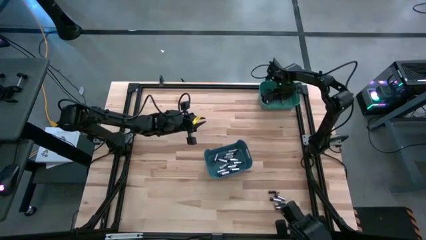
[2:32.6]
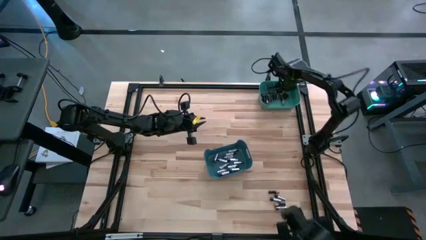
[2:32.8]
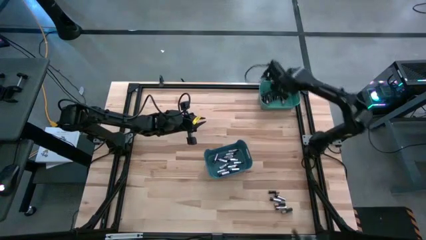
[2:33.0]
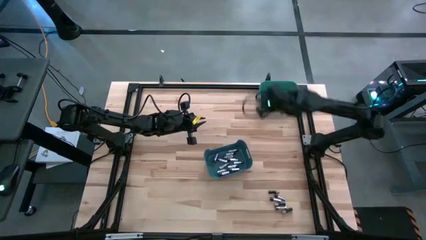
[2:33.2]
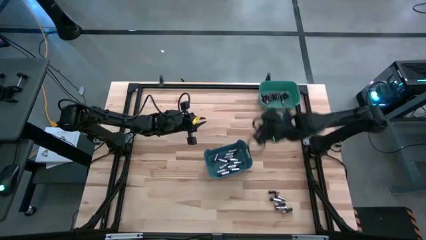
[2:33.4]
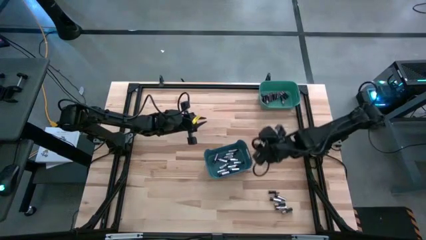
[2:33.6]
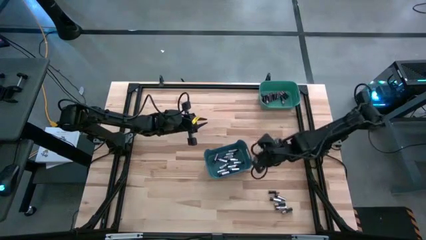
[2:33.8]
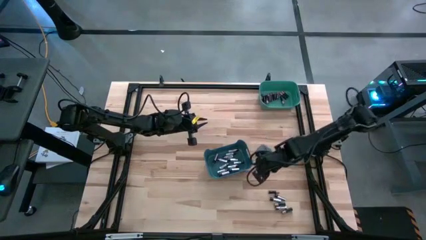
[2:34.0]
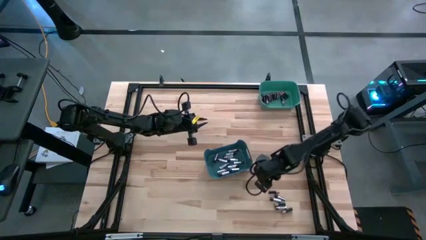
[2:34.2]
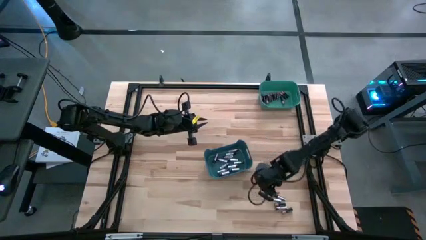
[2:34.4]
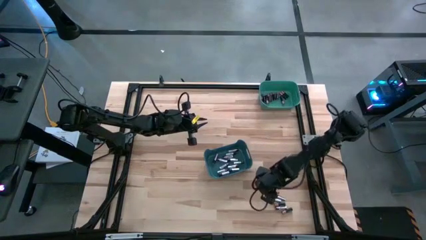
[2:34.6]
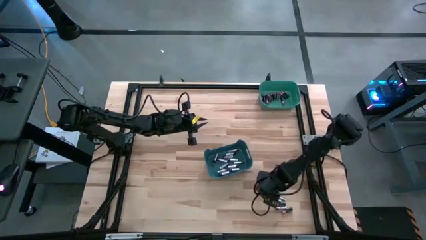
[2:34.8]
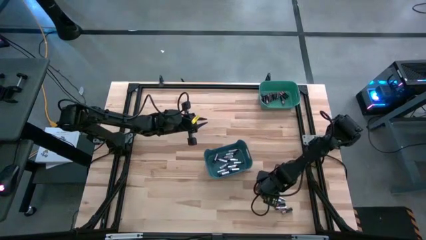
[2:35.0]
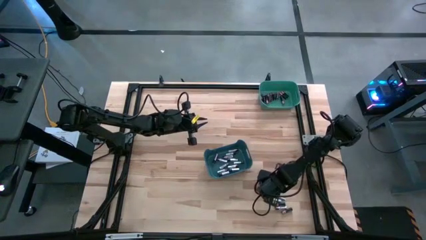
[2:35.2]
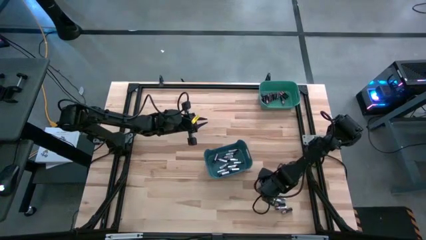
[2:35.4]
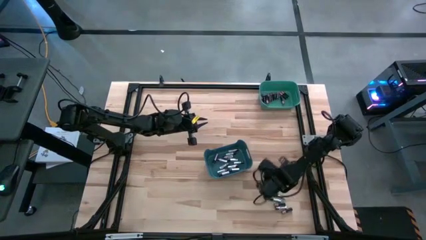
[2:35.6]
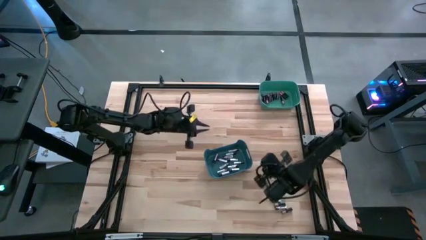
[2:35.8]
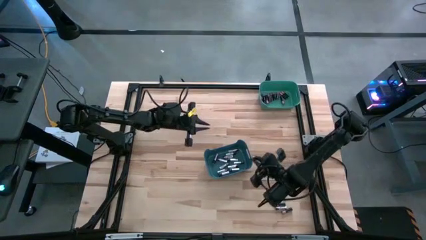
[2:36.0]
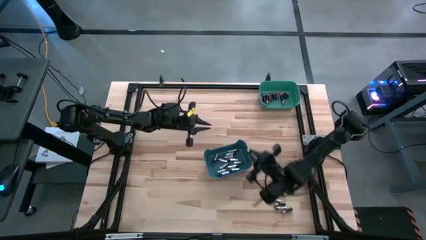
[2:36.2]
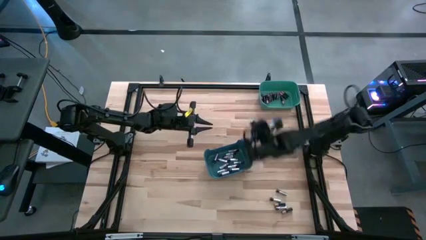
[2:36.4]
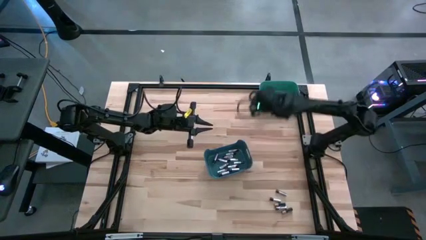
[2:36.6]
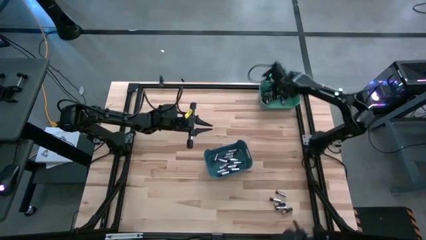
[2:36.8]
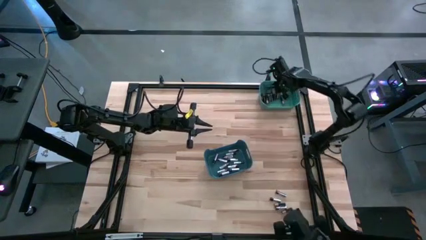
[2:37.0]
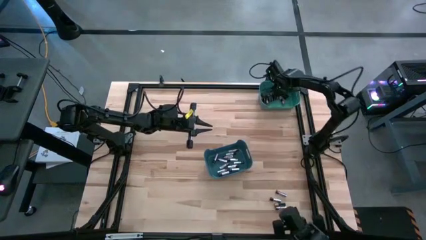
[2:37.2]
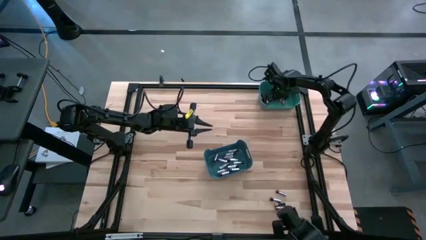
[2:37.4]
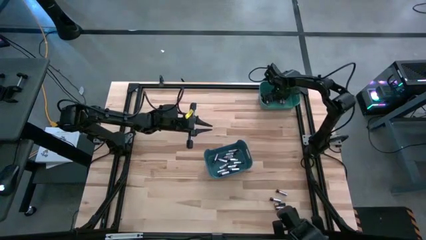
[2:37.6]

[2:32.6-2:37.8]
Task: Sort batteries
Put the black battery into the green bin

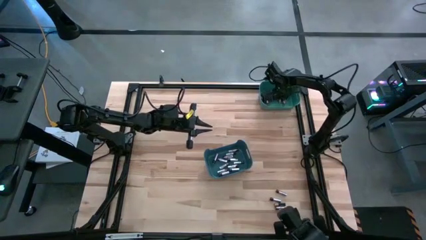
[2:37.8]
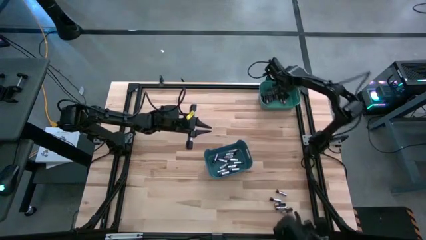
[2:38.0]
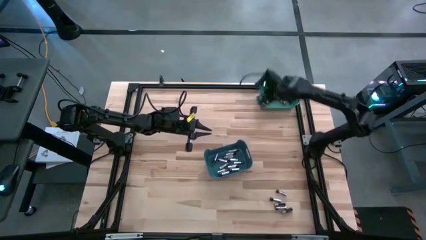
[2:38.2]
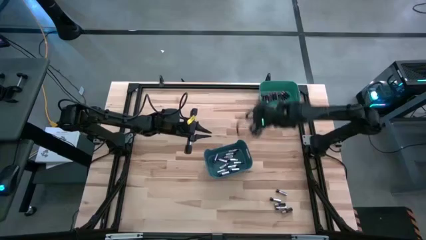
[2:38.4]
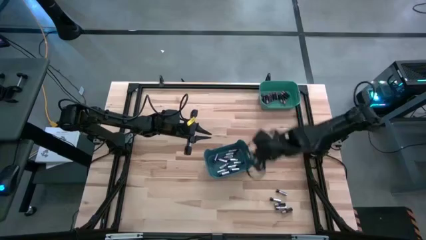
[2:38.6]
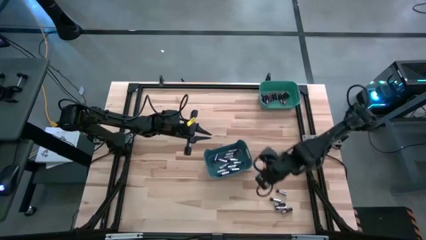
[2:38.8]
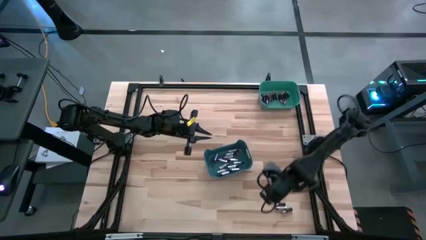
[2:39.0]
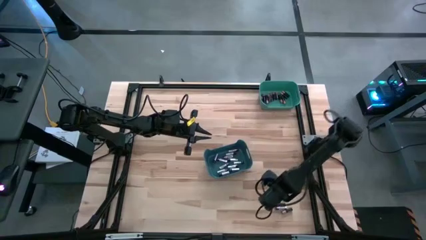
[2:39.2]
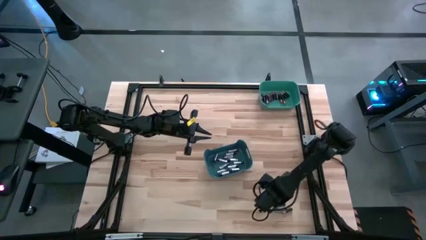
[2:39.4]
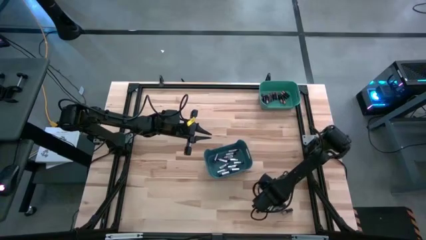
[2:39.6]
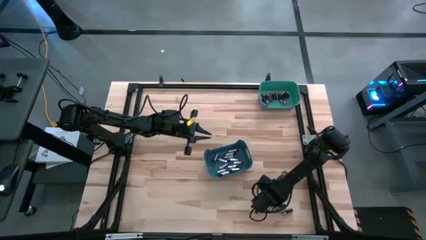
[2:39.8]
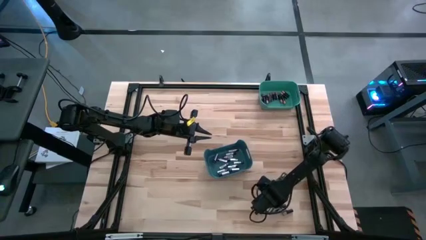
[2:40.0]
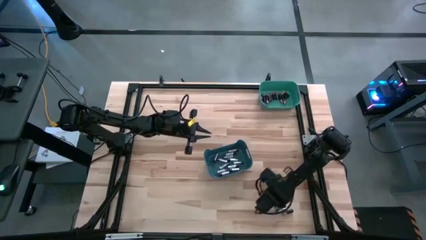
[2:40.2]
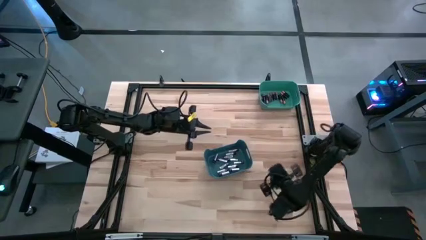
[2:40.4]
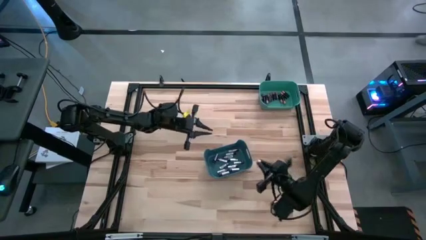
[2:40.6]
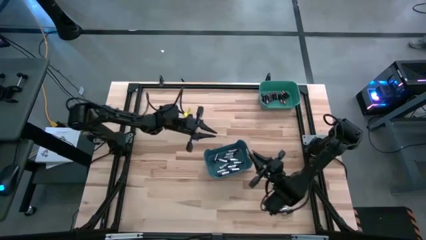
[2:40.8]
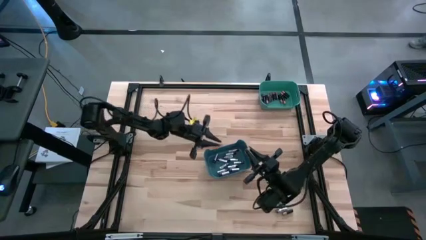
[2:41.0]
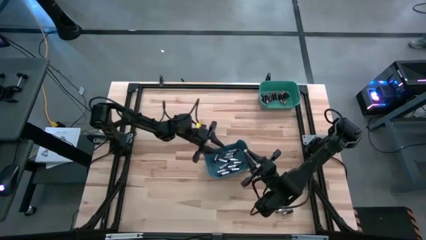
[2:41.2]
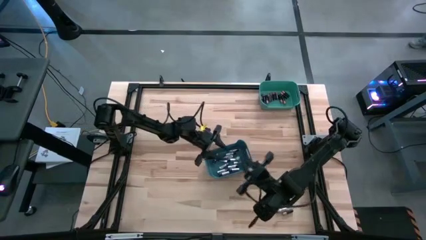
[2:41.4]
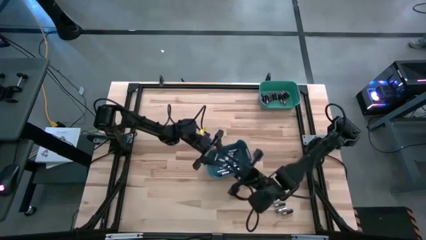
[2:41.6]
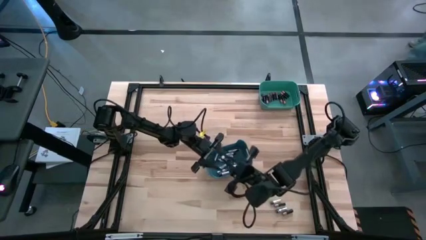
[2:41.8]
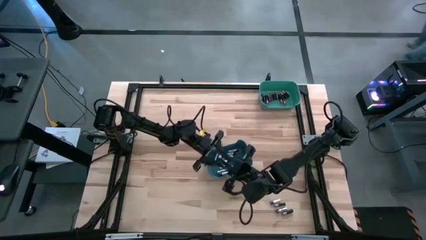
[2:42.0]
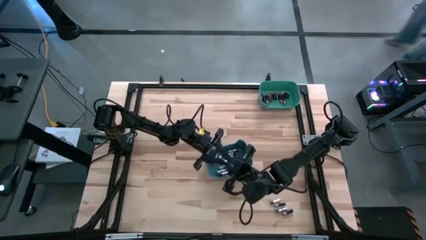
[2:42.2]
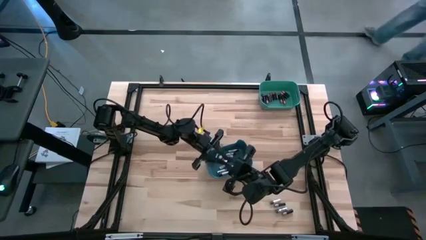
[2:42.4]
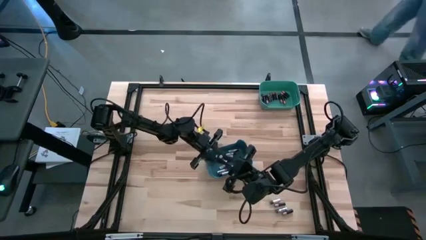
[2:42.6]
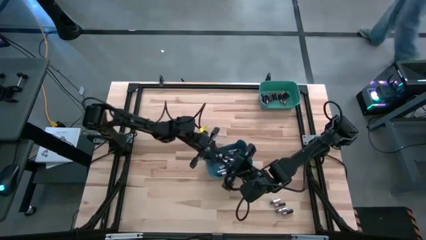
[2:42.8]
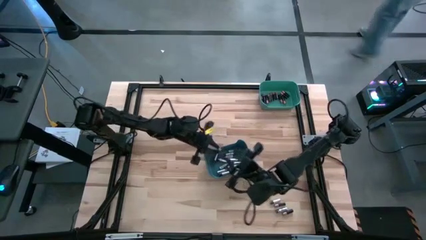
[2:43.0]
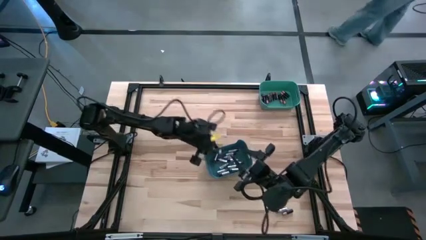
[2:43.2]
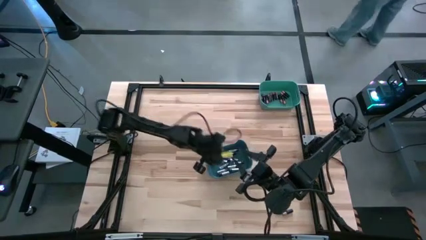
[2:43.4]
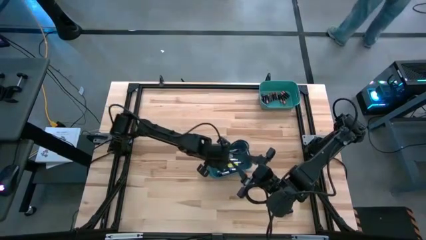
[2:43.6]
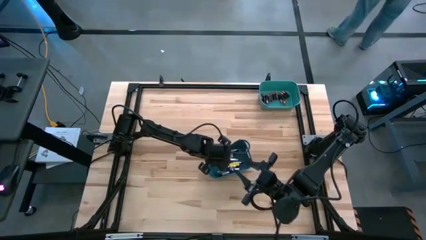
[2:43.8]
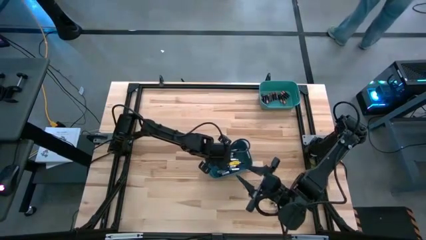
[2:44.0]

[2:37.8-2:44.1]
Put the silver battery into the blue bin

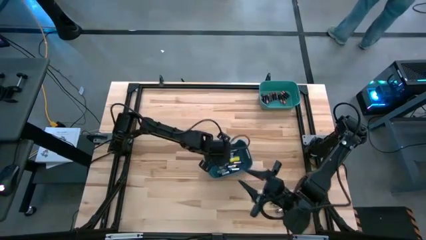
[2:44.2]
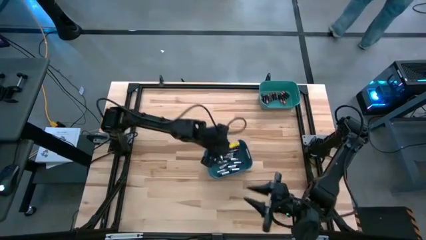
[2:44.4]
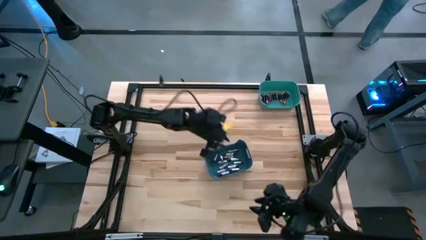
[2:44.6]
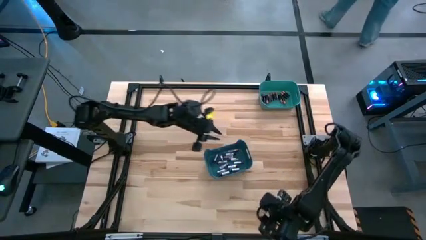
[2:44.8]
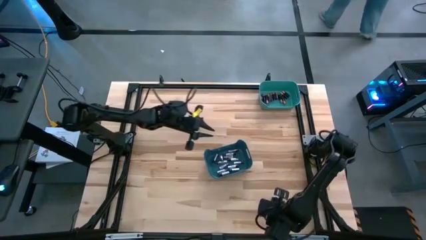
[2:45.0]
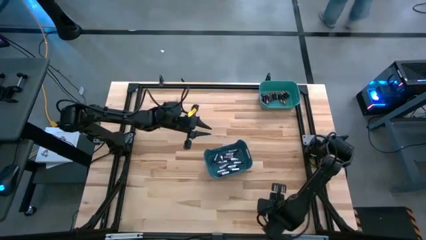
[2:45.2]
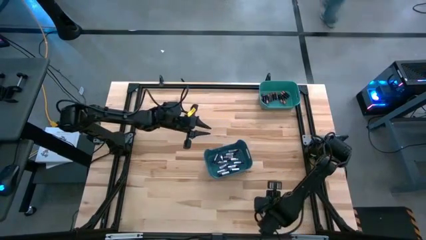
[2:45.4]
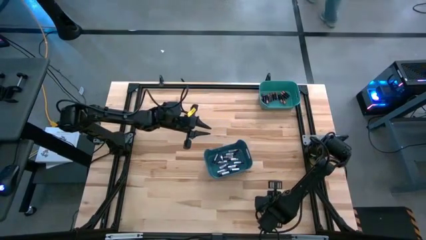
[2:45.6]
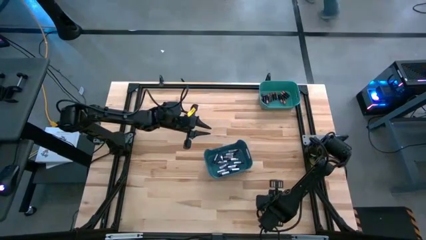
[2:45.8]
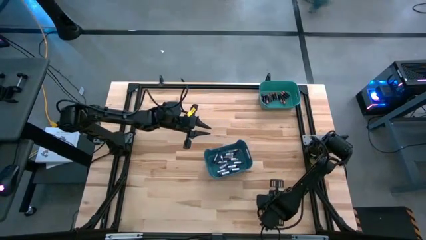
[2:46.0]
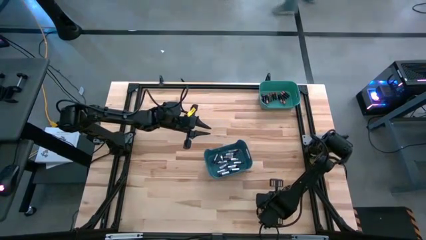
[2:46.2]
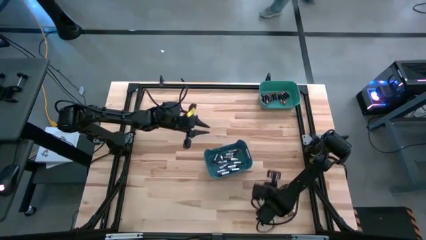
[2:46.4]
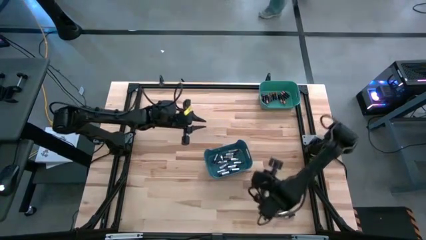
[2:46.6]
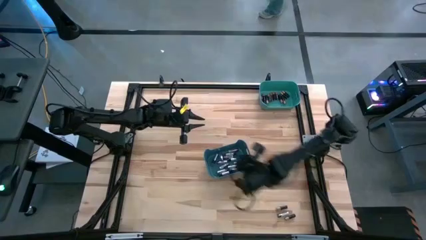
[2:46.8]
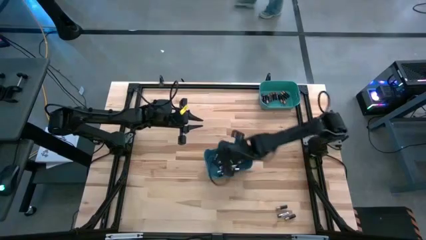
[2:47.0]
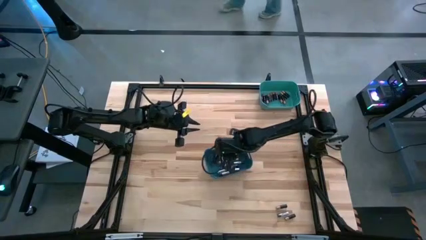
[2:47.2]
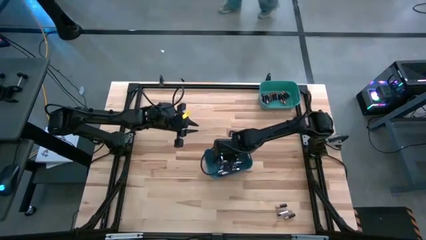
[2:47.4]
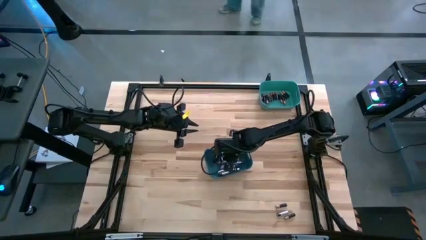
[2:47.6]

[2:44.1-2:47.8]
Put the silver battery into the blue bin

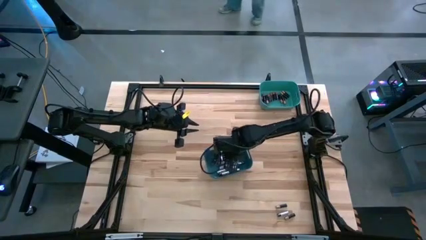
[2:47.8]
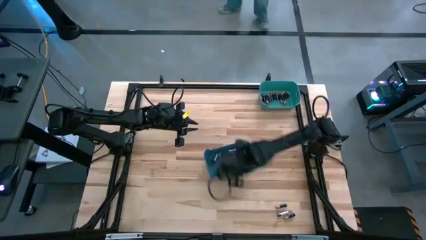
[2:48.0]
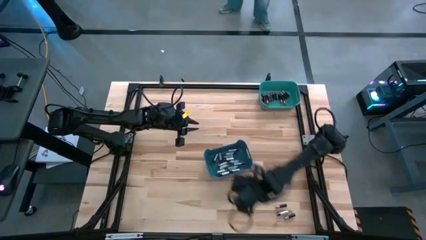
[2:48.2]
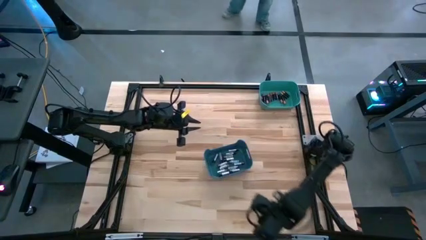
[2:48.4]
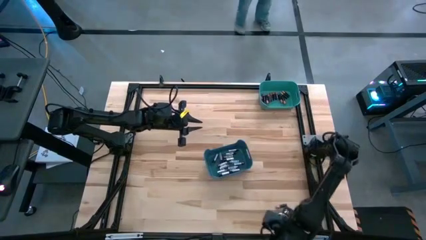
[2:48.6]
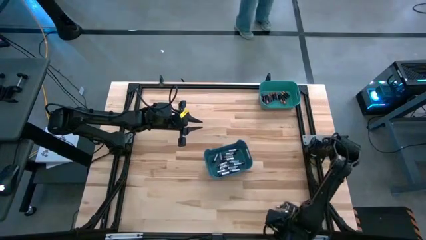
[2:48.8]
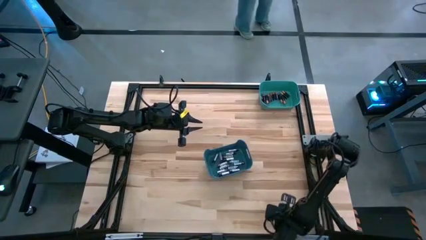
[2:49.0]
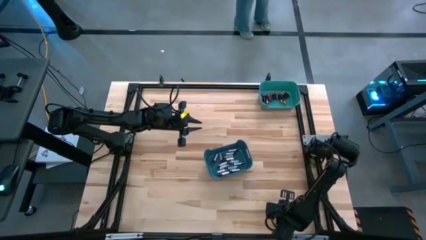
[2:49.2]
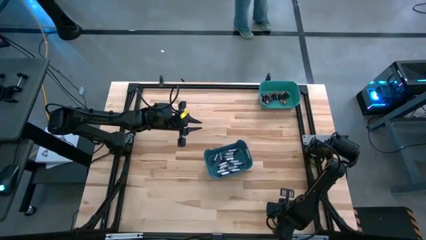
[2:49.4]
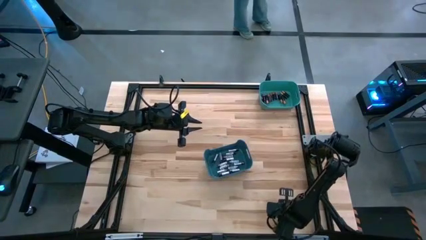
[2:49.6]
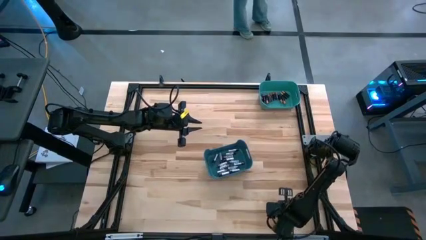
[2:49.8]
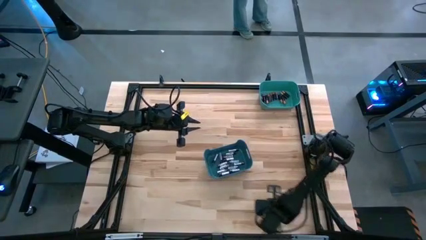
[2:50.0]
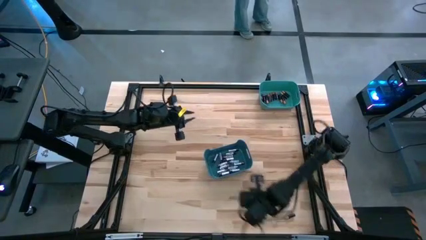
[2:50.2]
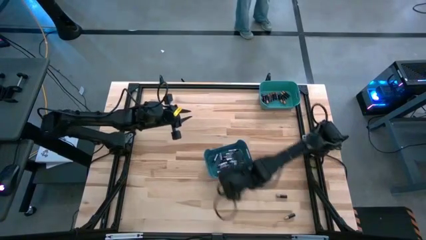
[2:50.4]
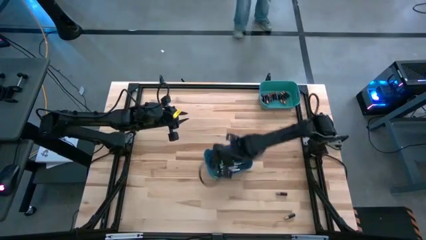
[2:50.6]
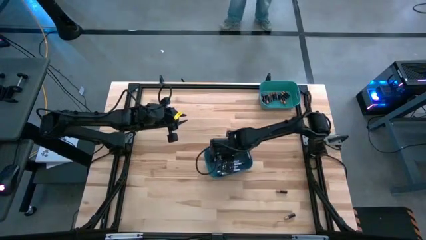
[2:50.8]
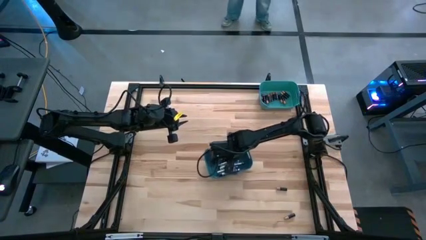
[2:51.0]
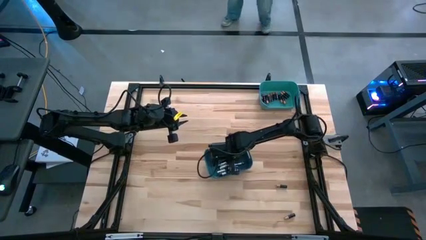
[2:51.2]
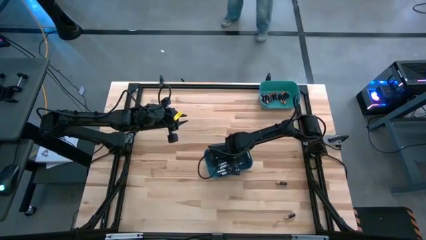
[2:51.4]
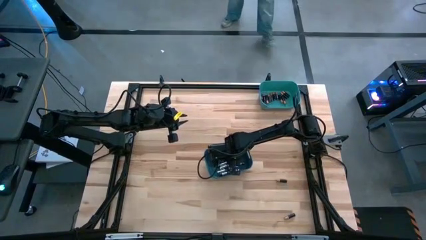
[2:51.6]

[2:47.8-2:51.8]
Put the silver battery into the blue bin
